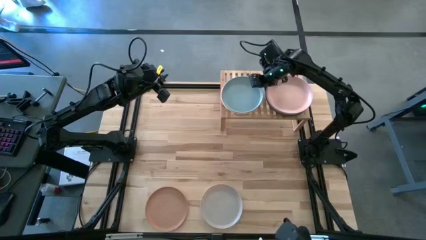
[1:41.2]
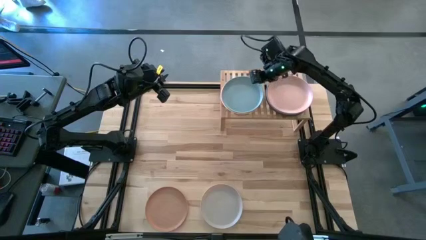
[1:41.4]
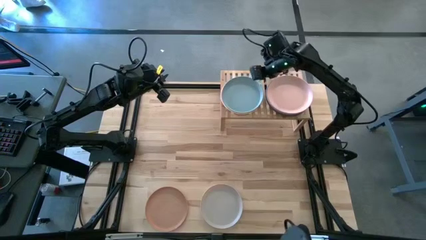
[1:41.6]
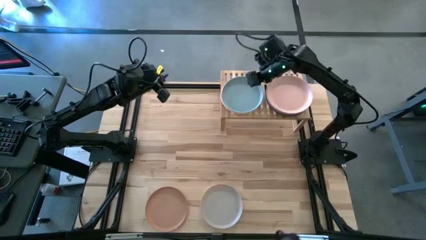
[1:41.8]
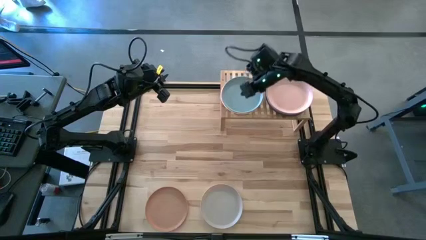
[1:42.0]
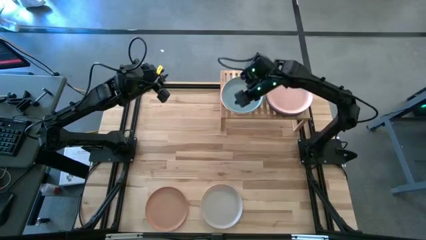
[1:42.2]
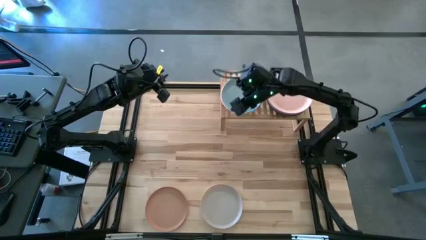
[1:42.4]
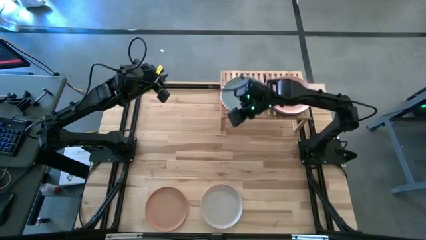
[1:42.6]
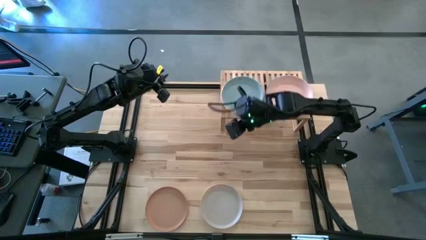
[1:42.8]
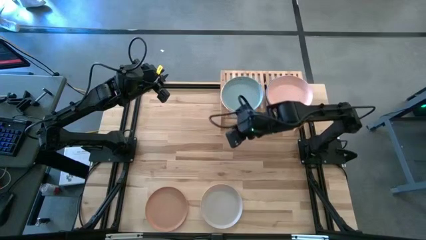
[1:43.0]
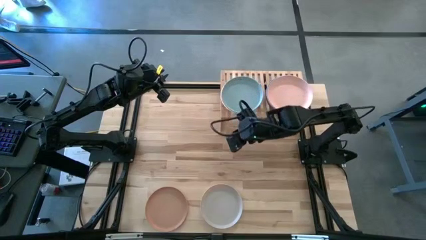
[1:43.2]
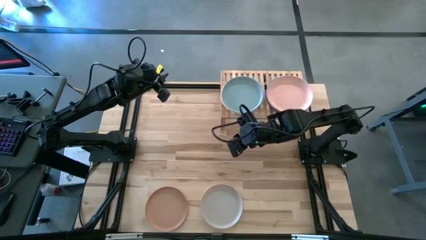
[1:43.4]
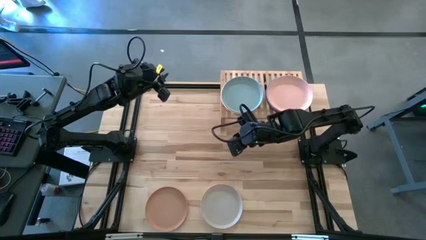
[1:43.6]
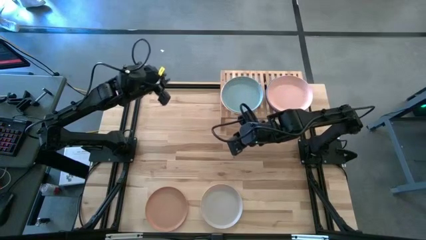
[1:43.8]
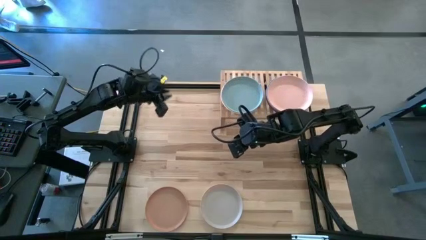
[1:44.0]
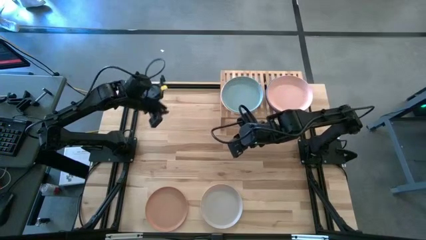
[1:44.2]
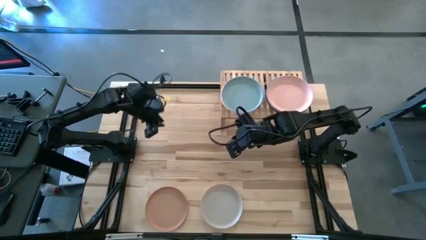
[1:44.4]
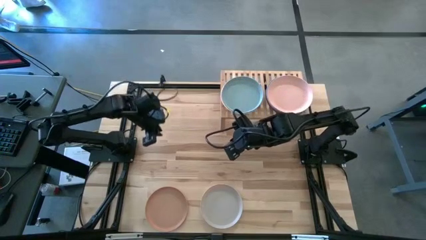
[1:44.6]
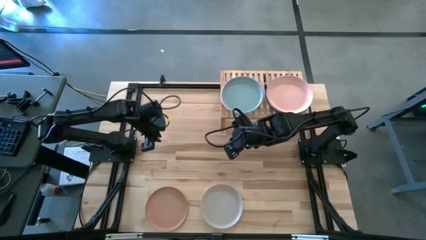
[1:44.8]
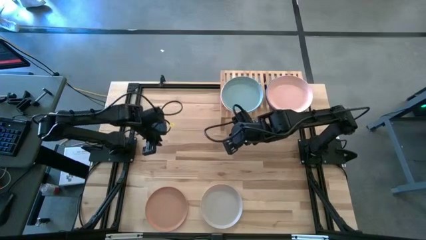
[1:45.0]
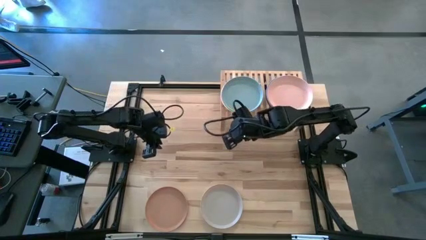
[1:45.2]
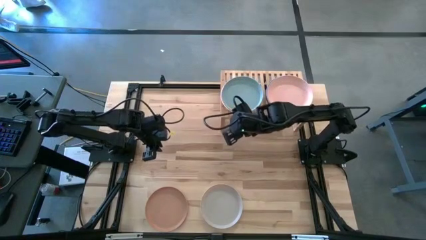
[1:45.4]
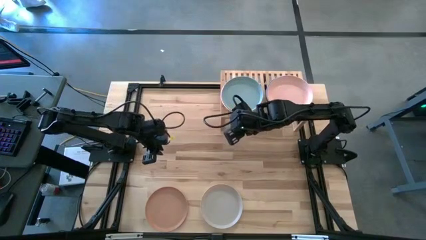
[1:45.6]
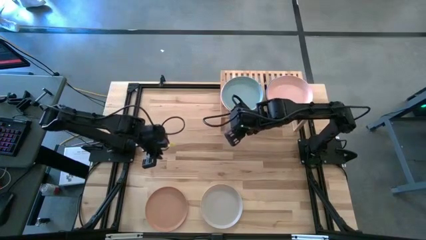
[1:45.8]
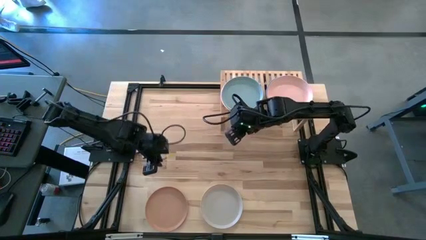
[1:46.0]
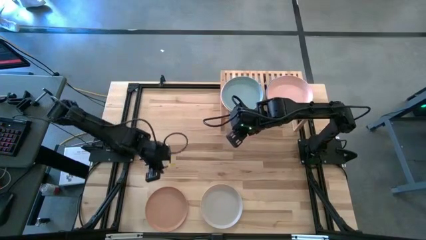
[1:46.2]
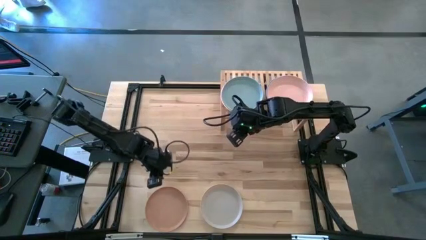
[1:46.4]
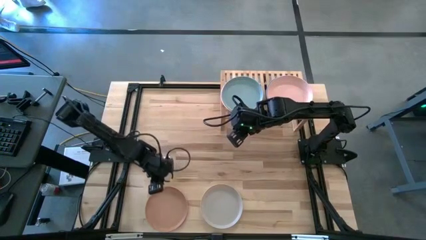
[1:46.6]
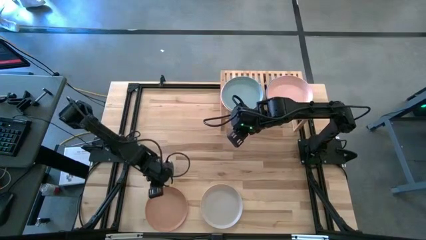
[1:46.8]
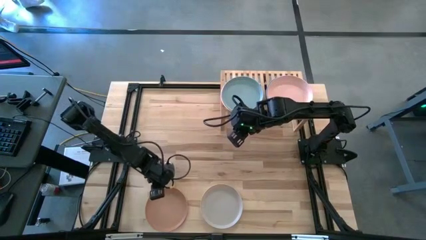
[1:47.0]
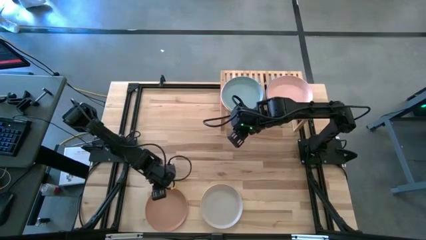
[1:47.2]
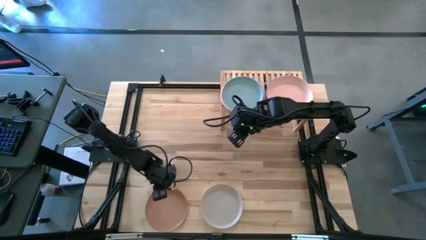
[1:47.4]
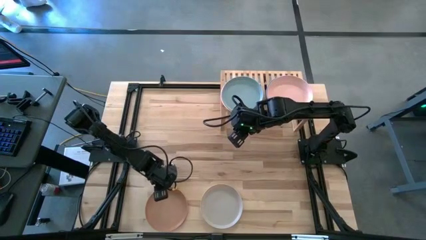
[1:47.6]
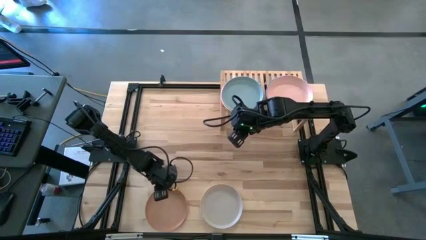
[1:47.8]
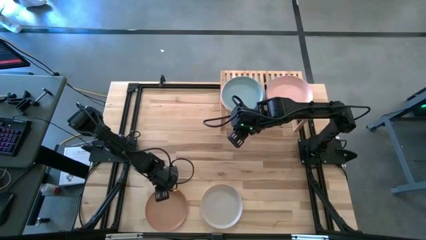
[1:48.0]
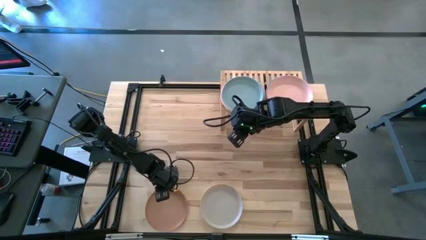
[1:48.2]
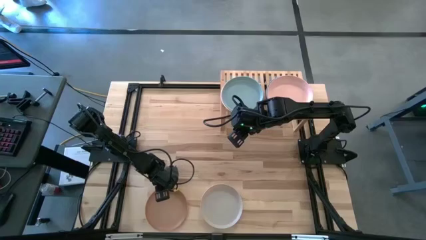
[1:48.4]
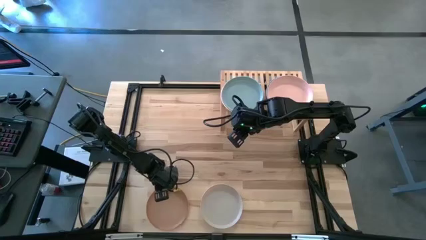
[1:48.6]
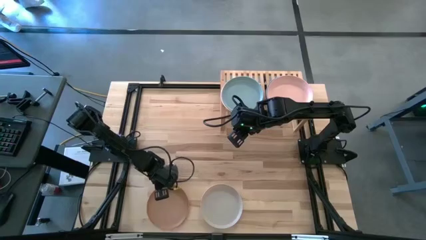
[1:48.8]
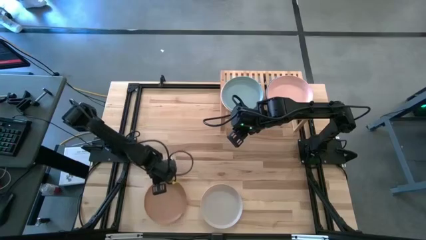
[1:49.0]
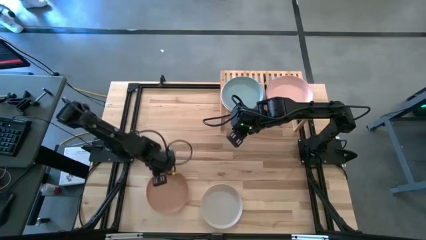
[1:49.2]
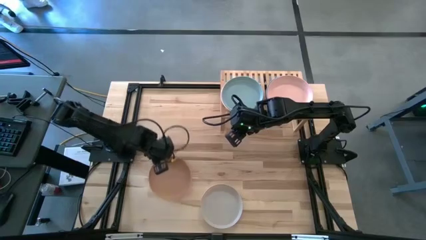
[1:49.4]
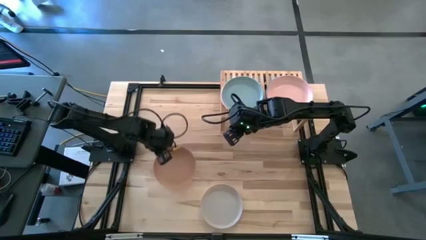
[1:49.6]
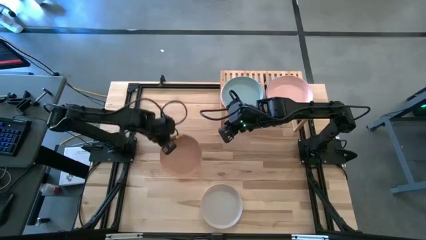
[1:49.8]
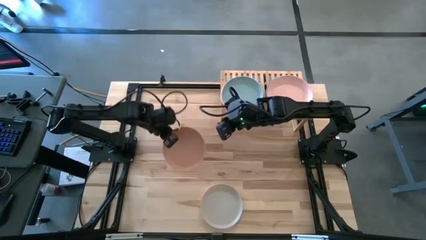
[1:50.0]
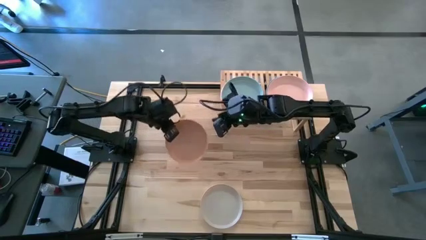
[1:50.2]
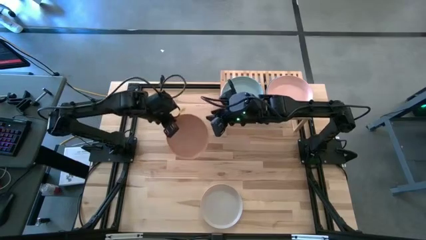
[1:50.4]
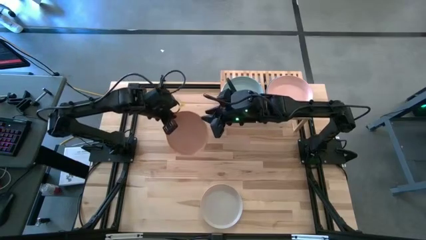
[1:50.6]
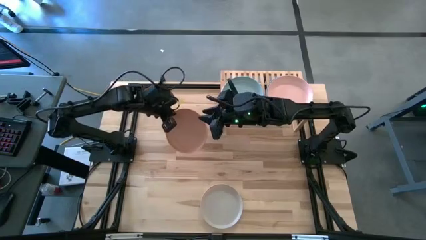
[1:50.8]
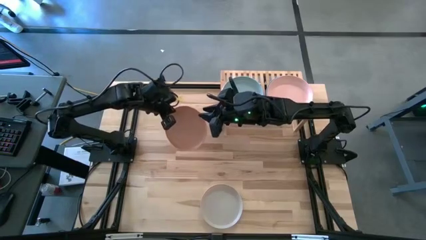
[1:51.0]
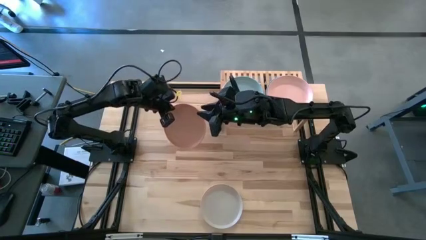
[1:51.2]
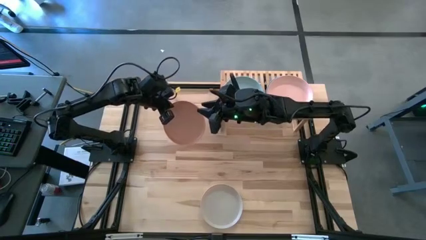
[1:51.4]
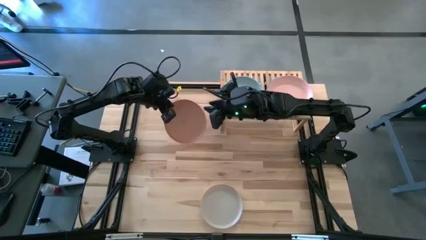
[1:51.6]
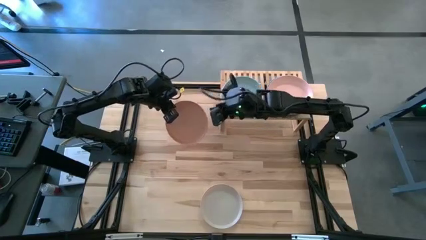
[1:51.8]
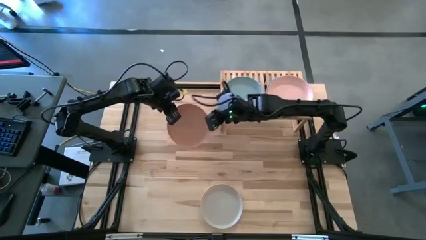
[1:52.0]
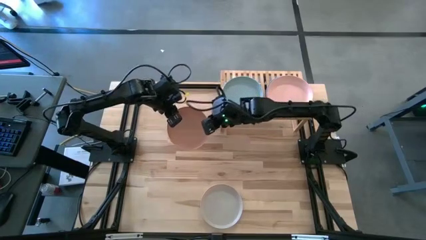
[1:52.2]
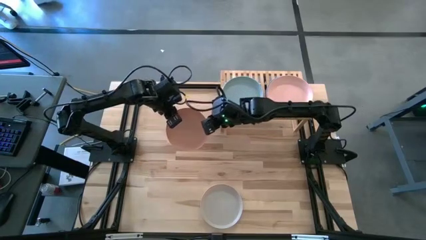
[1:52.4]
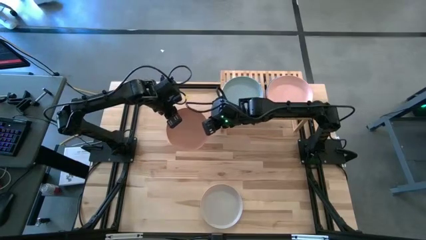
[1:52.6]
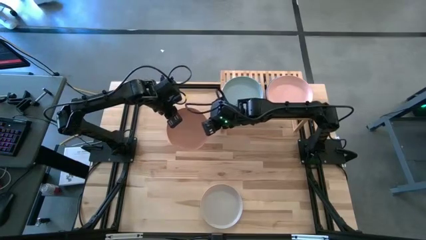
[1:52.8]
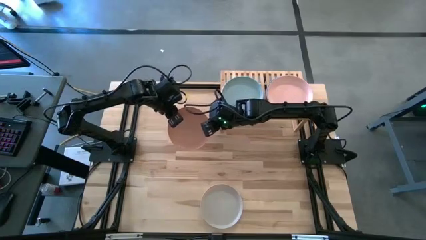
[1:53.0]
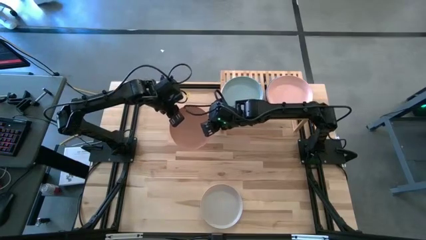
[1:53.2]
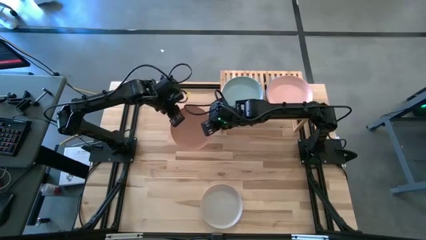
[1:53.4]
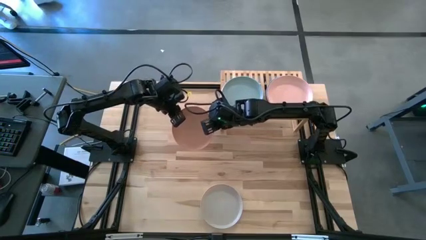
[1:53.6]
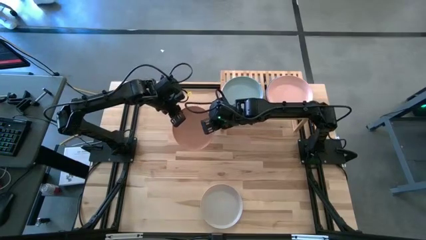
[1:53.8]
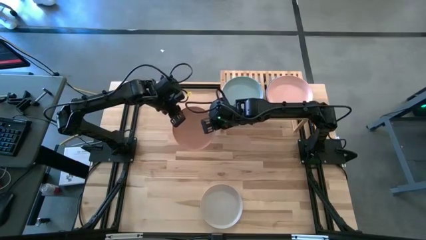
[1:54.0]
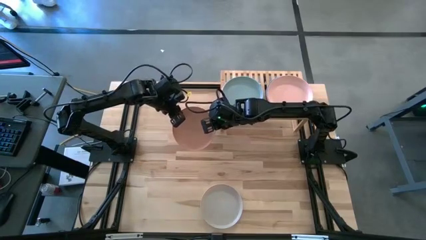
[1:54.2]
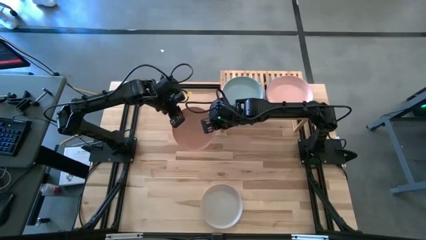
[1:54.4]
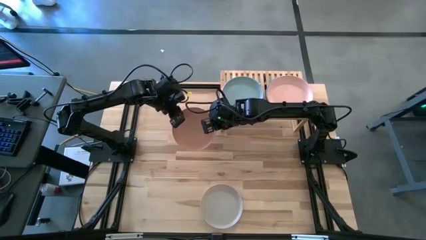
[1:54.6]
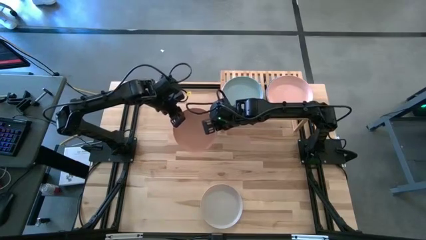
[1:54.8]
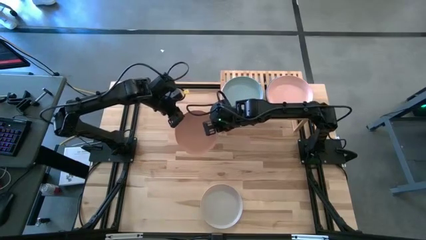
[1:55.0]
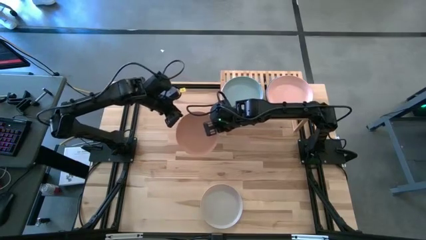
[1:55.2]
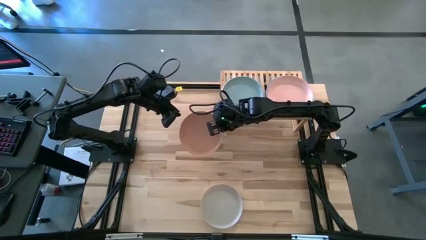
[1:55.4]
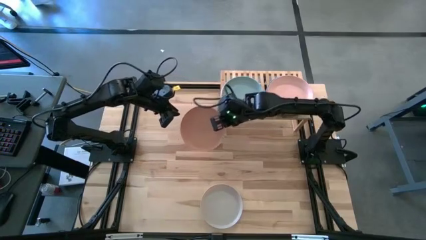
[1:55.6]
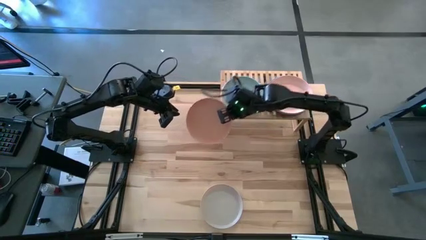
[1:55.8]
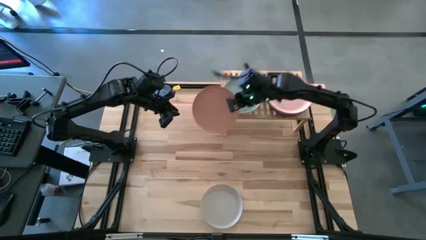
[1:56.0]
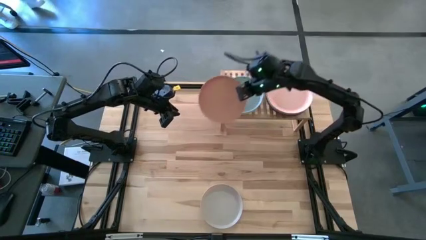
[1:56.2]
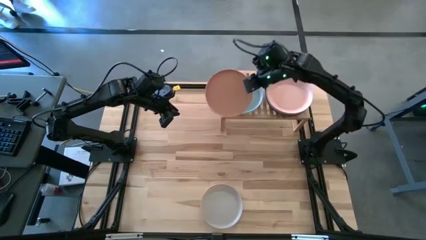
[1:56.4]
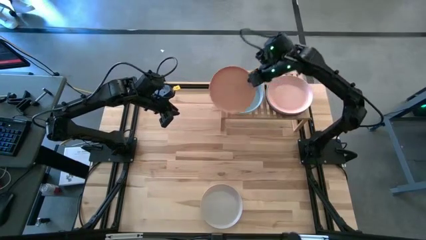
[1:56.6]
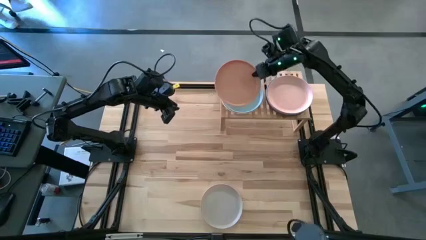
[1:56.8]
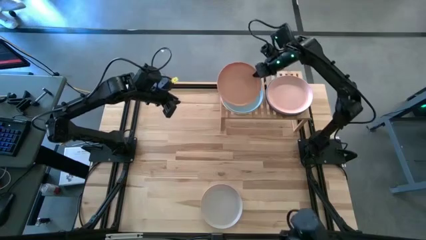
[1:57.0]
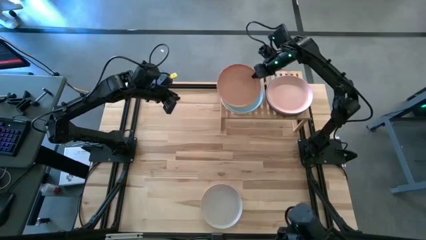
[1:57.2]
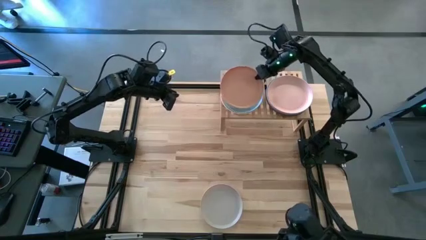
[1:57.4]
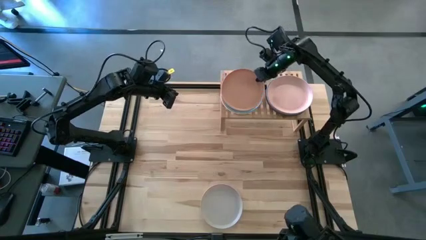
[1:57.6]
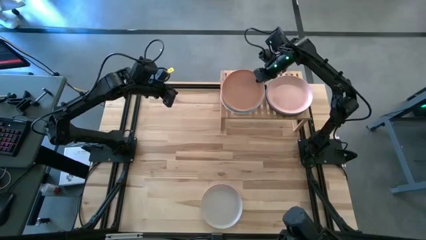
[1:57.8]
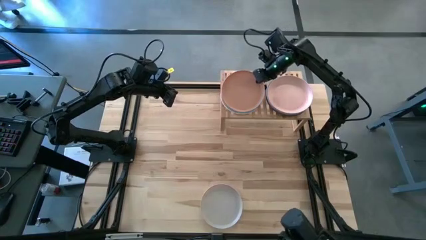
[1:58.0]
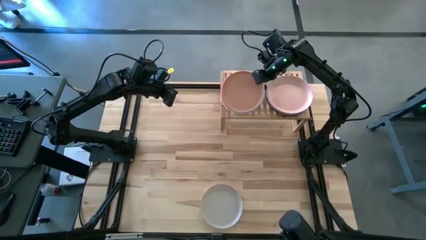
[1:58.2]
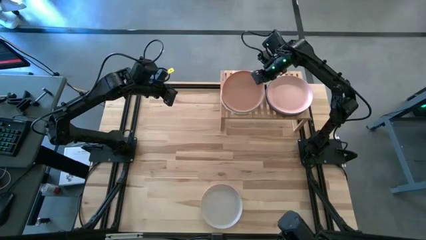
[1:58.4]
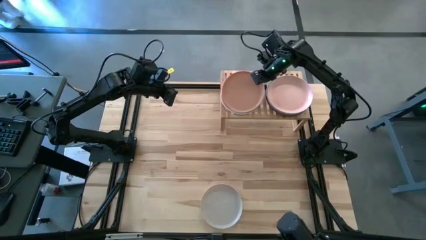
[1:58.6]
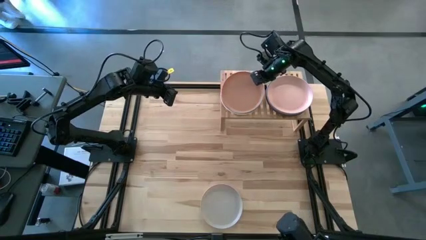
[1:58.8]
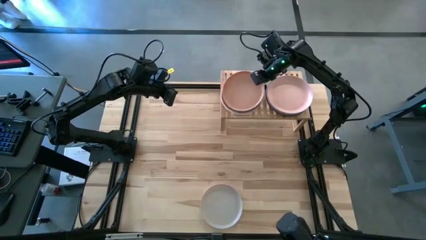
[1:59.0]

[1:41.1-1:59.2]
Task: Place and stack plates onto a shelf
Stack the brown plate on top of the light blue plate on the shelf
